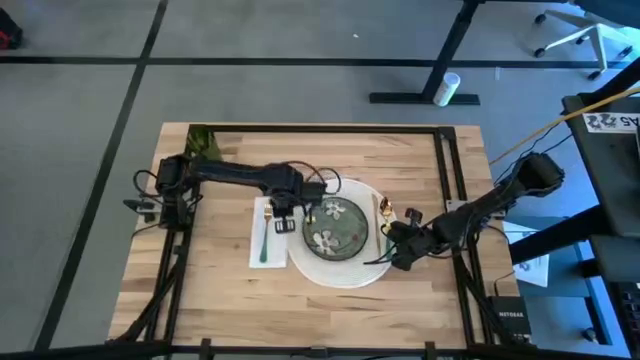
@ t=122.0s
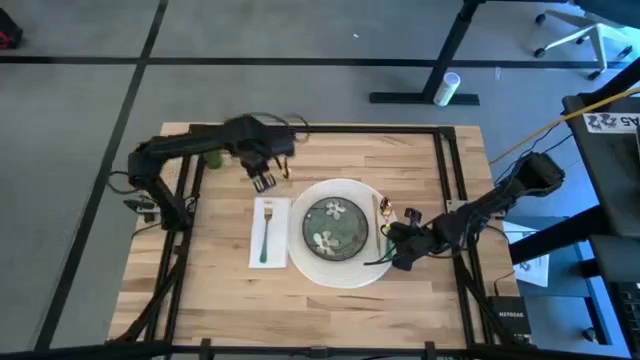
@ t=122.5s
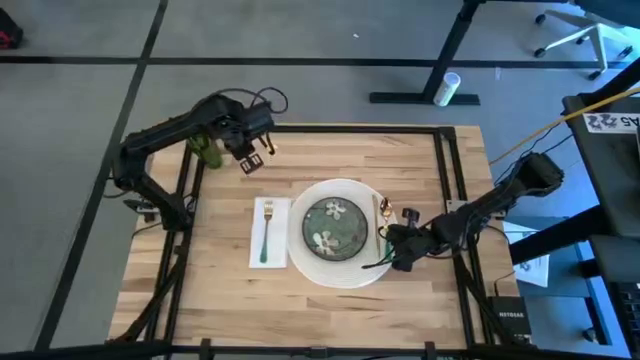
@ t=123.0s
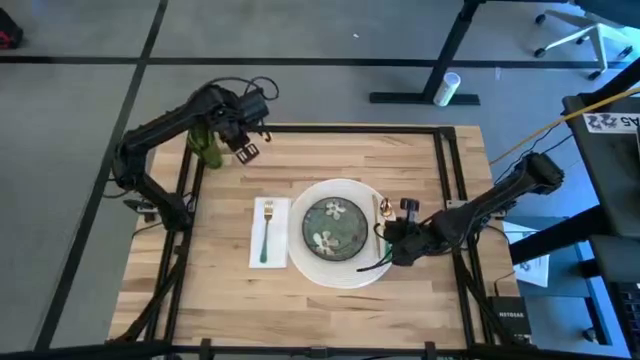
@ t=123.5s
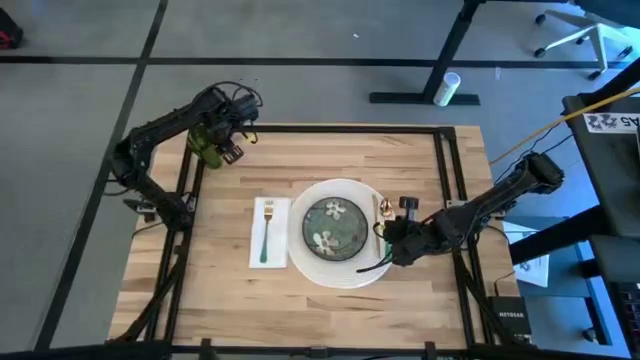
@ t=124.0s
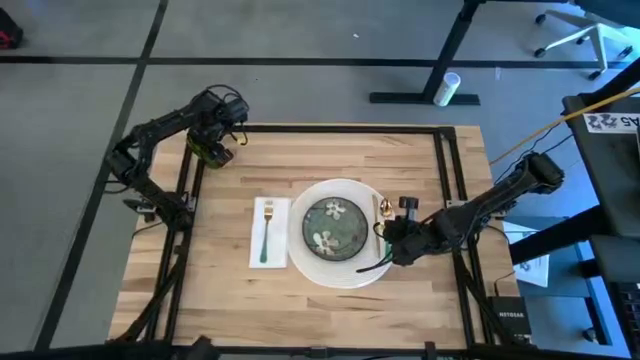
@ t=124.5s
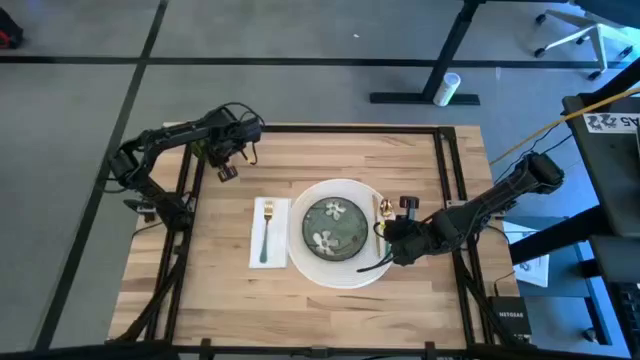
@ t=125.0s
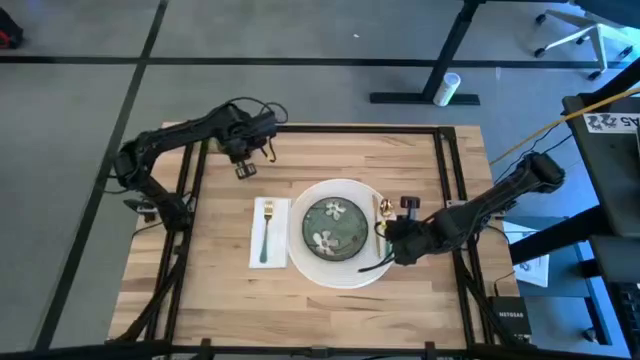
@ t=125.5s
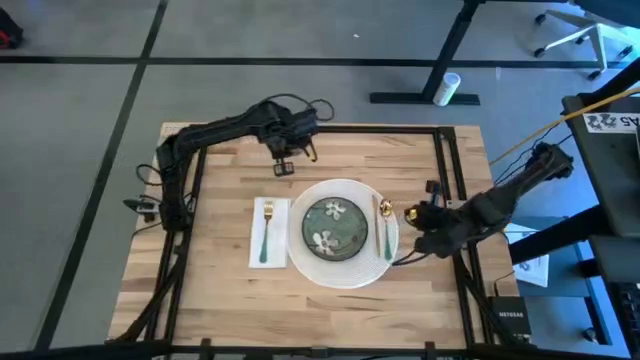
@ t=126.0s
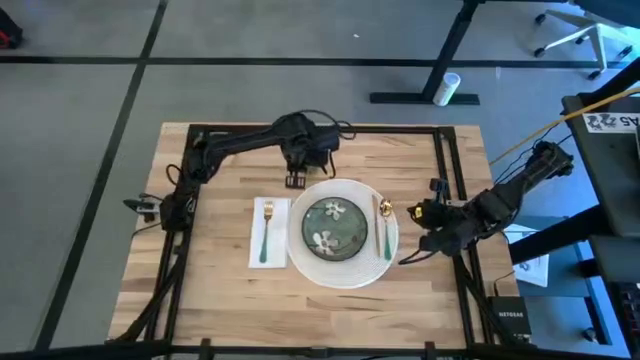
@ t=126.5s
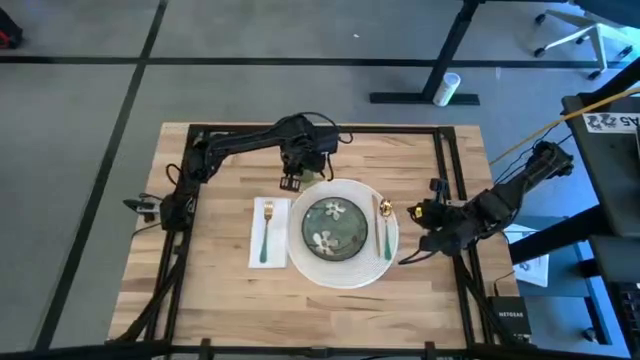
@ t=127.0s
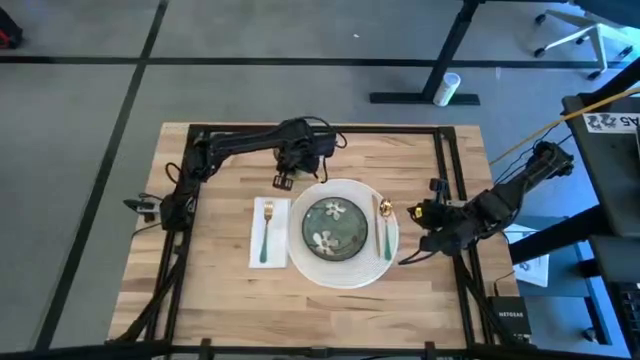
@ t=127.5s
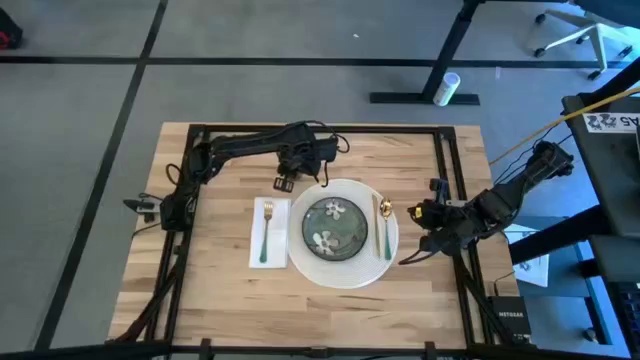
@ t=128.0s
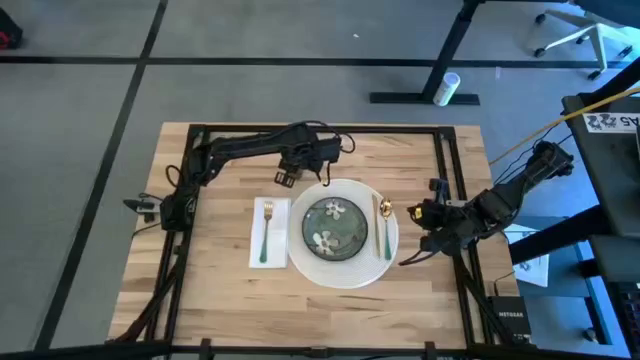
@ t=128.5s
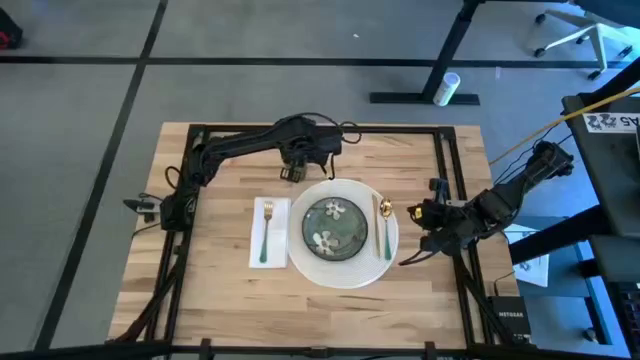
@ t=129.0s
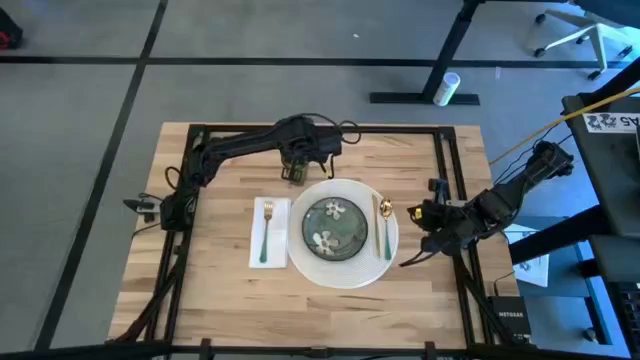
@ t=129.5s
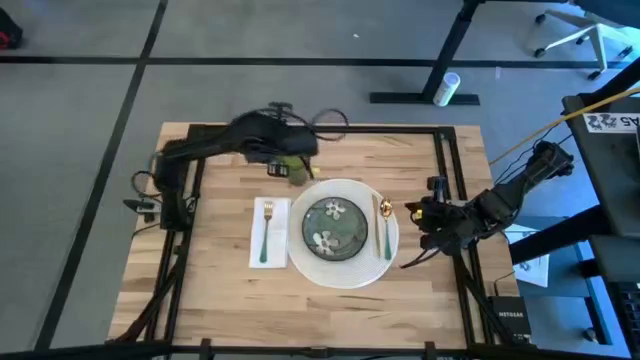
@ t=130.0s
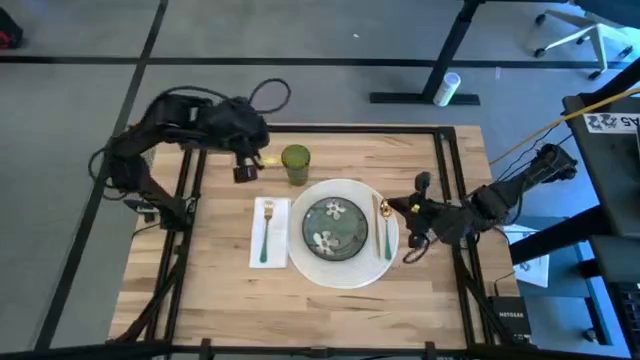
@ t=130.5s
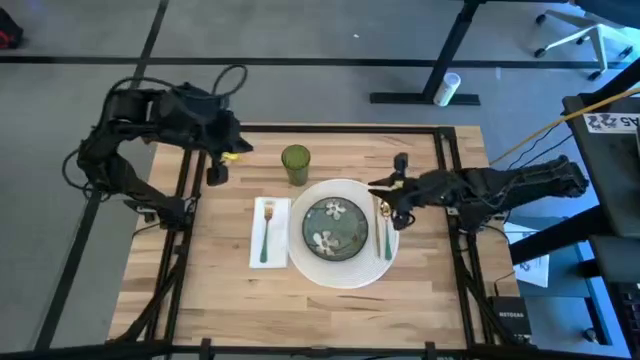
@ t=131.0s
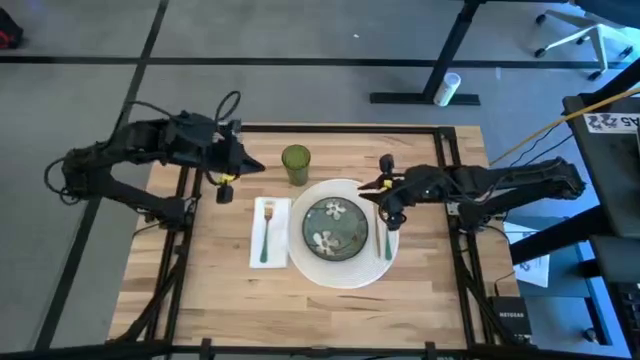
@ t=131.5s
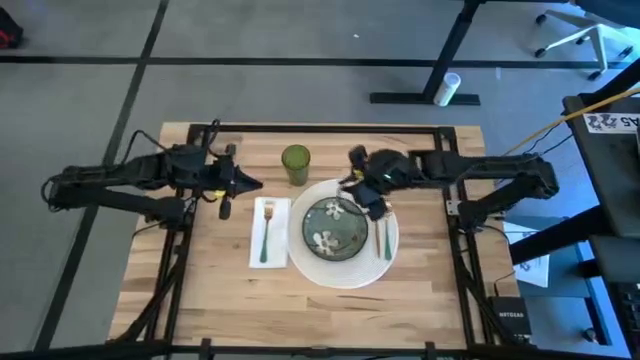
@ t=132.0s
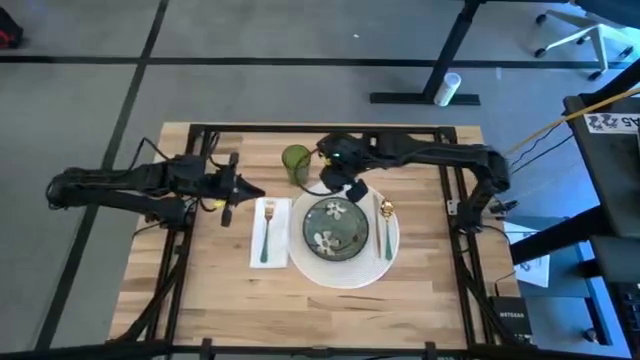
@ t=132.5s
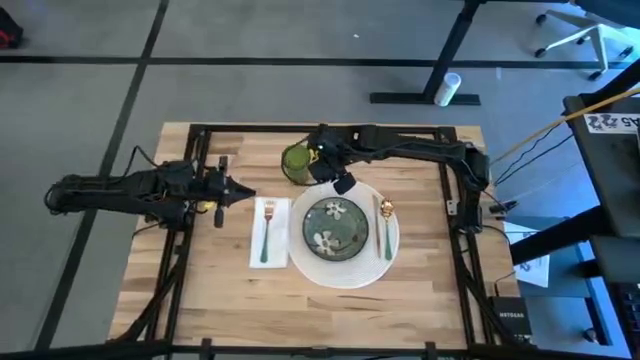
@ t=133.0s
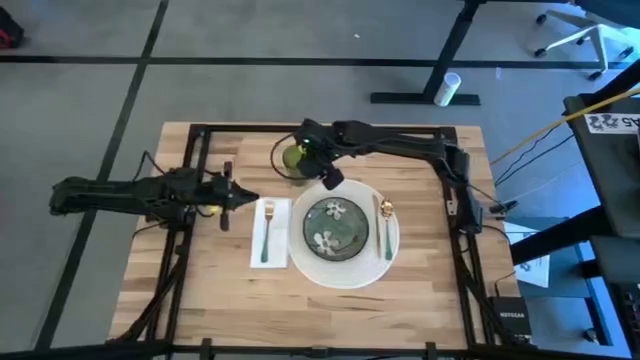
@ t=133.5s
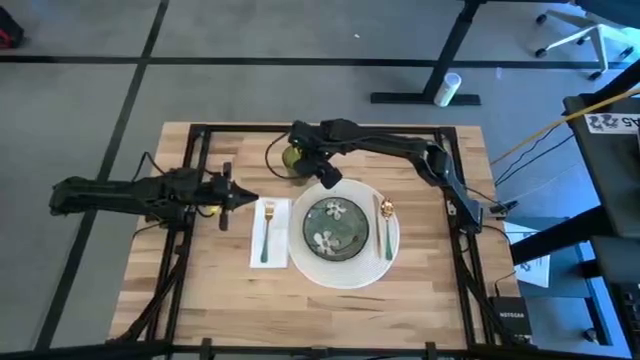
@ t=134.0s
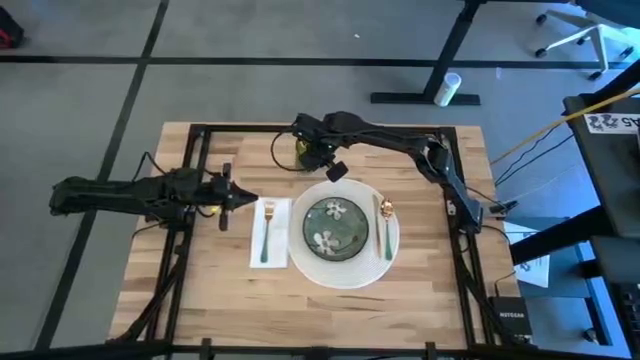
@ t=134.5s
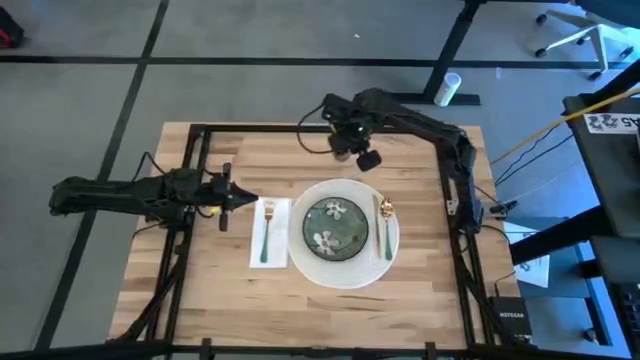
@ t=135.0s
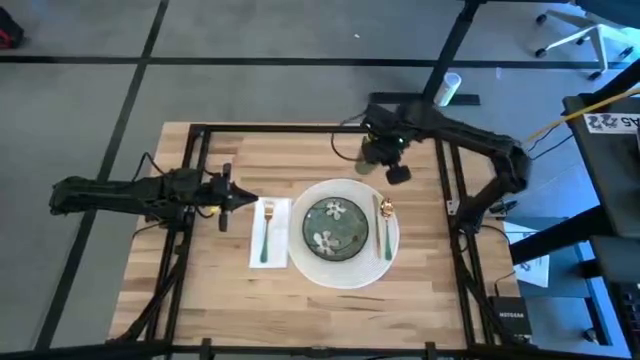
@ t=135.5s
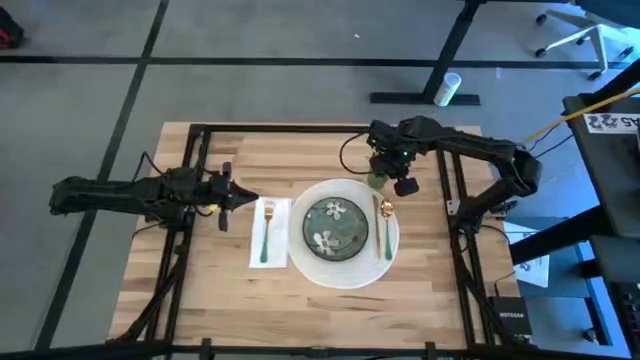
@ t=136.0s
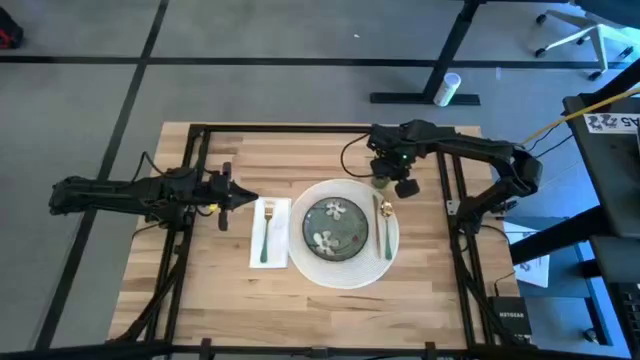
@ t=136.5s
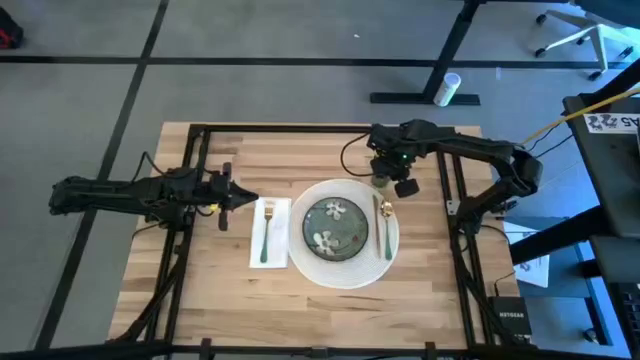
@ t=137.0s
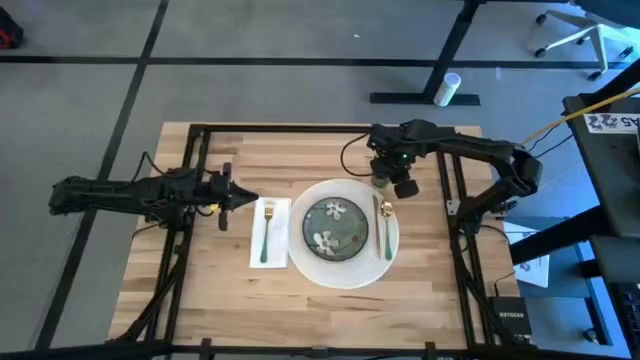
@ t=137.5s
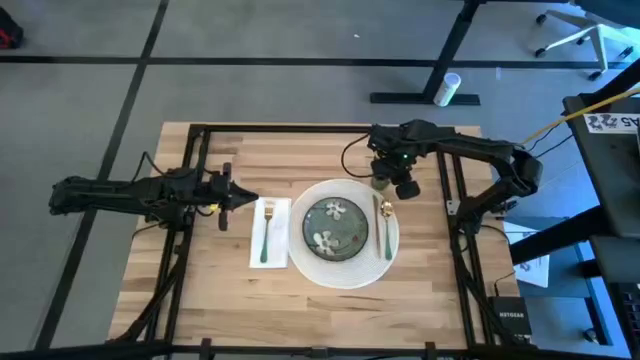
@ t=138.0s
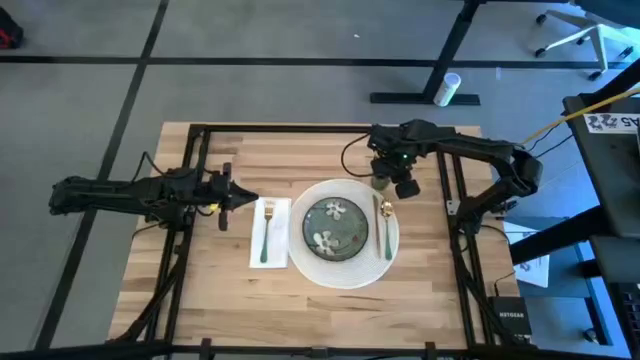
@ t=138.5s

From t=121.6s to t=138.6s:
Task: Set table place
Put the green cup to the top right of the white table mat

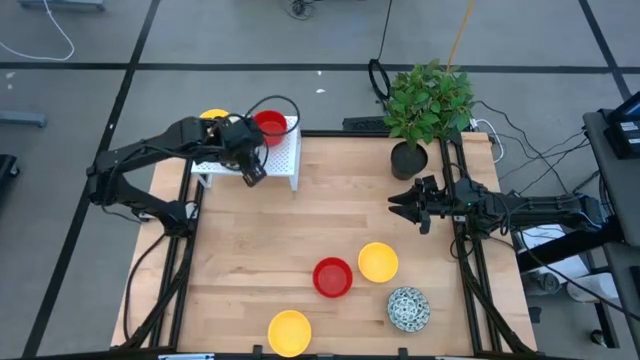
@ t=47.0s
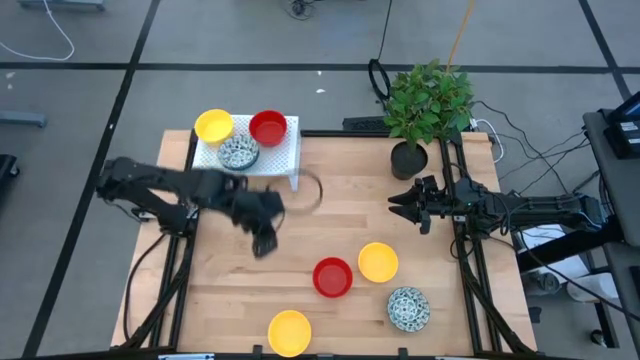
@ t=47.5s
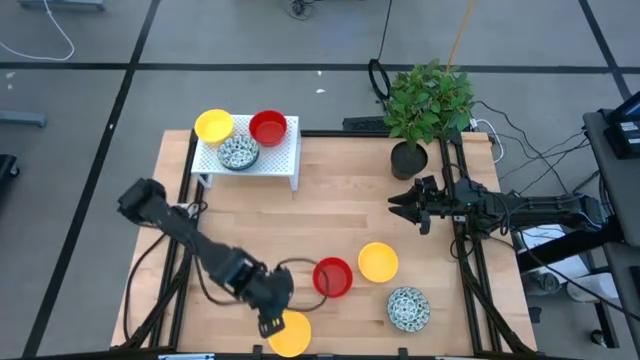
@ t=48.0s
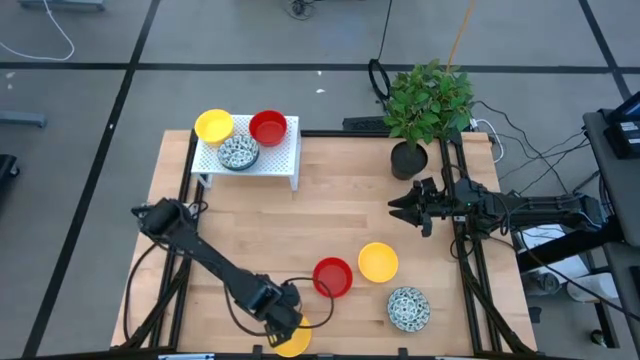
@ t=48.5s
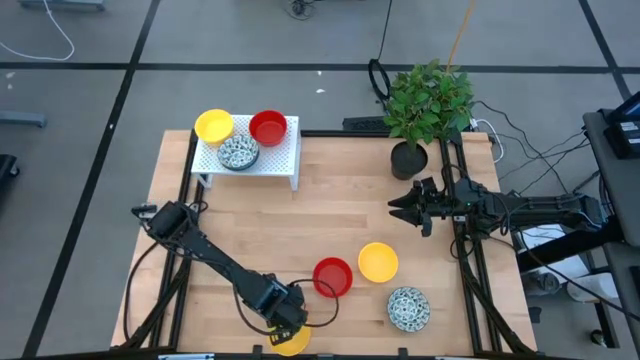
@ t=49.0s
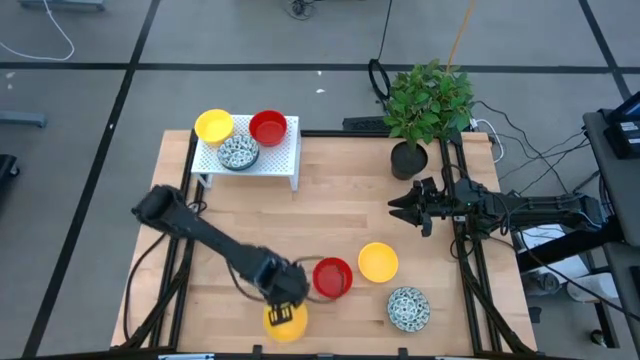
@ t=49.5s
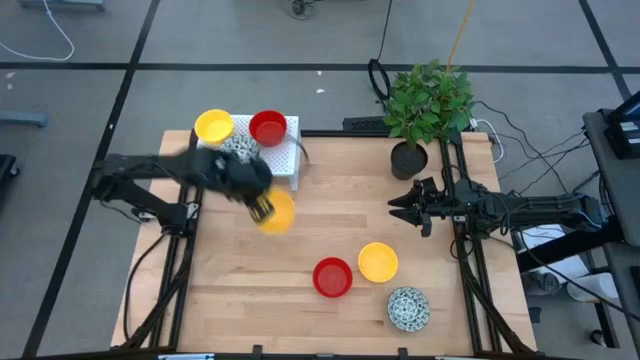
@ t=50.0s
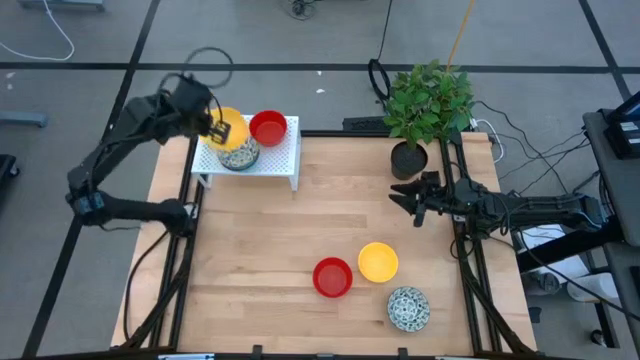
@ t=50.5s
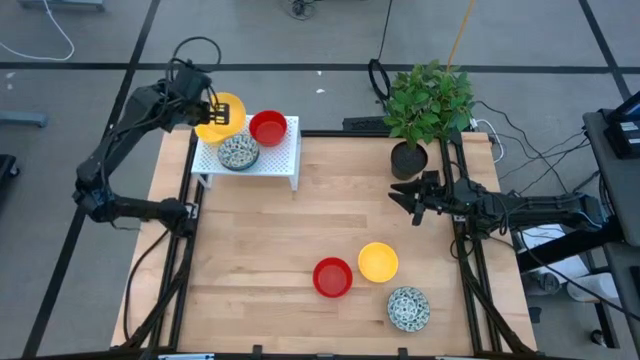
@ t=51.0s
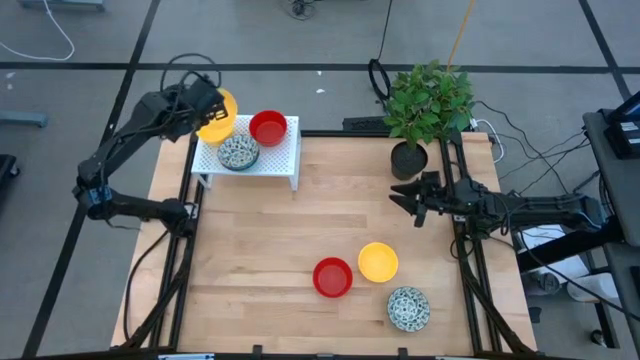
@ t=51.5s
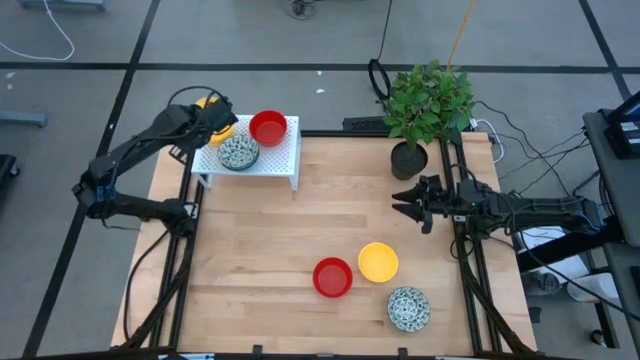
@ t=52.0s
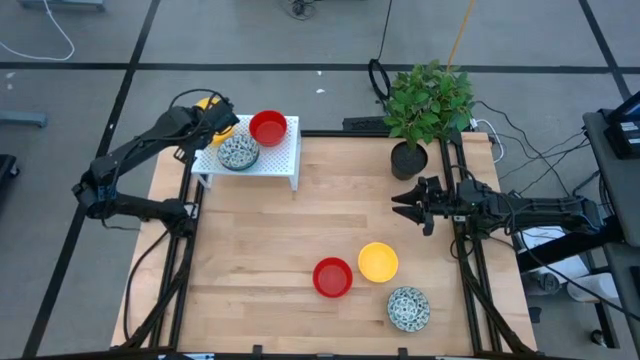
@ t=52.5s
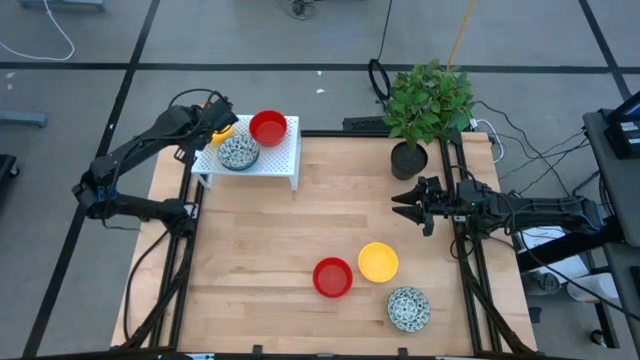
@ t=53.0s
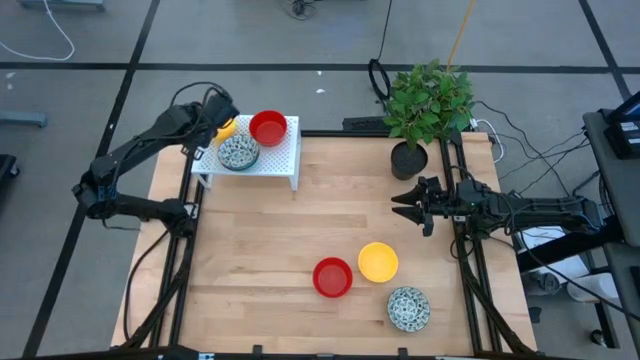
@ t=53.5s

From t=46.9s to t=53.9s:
Task: Pick & Place Mini bowls
Stack the yellow bowl on the yellow bowl on the shelf
